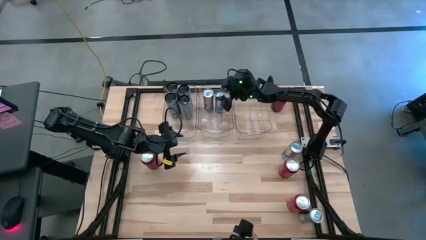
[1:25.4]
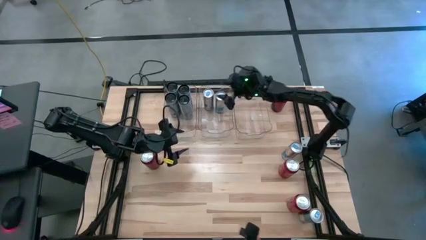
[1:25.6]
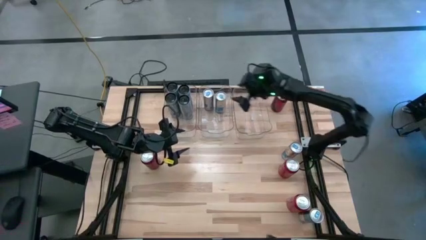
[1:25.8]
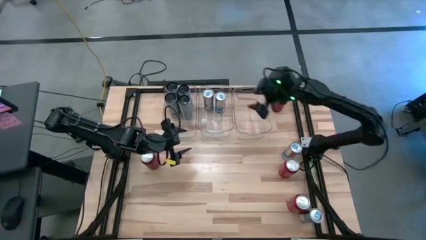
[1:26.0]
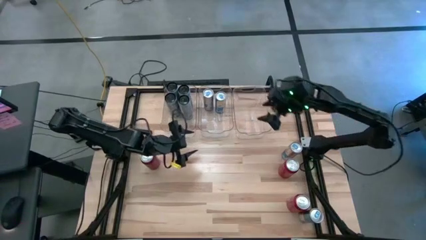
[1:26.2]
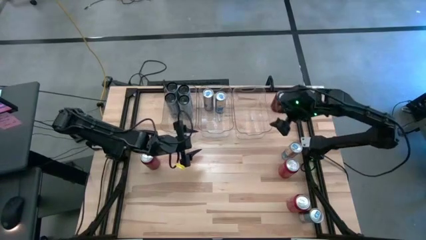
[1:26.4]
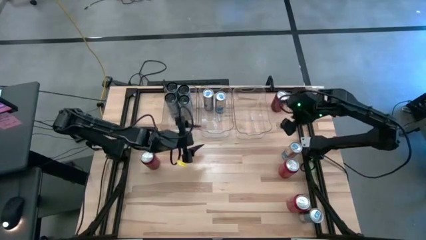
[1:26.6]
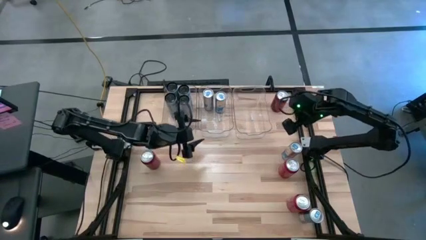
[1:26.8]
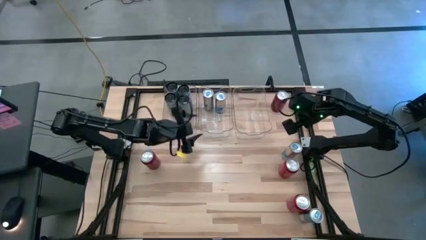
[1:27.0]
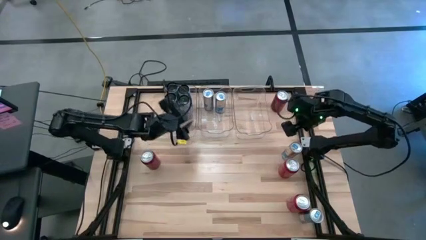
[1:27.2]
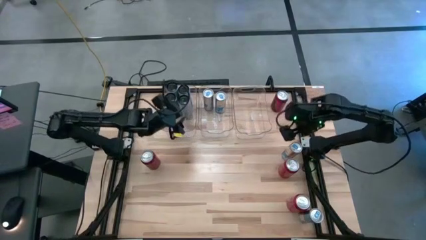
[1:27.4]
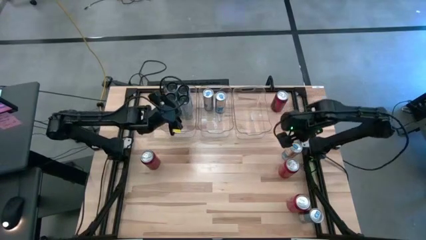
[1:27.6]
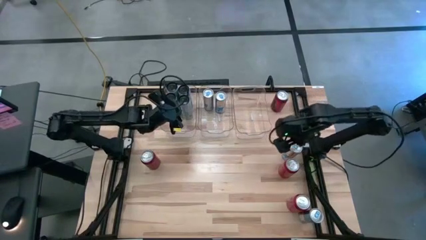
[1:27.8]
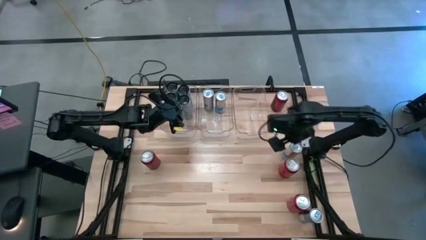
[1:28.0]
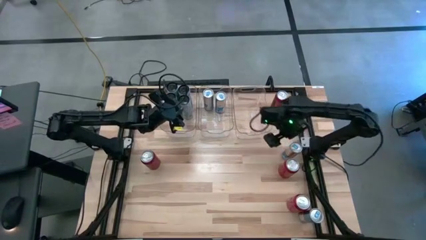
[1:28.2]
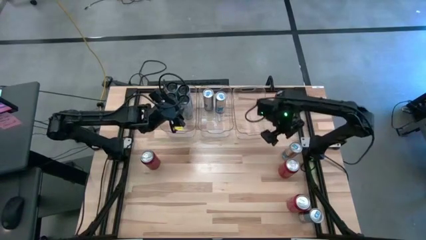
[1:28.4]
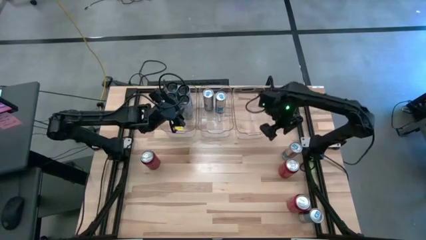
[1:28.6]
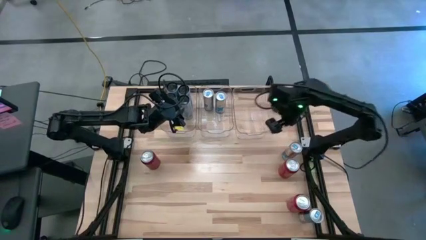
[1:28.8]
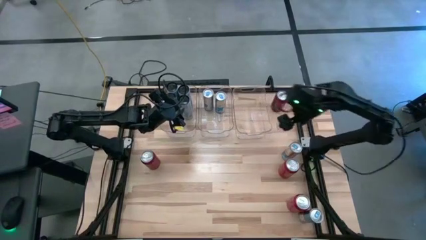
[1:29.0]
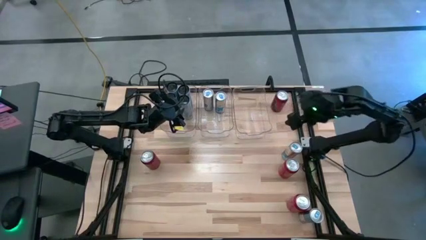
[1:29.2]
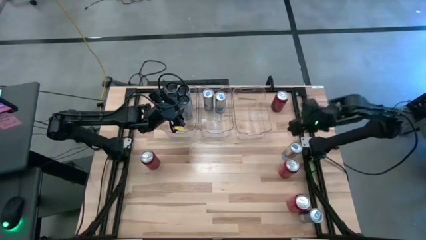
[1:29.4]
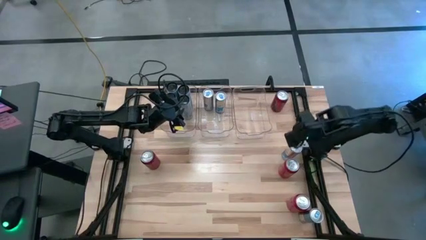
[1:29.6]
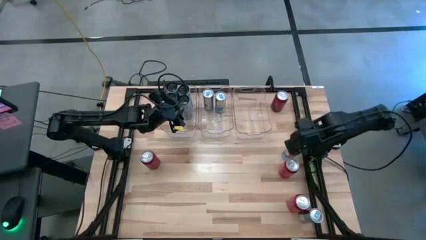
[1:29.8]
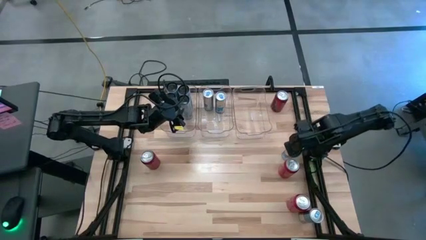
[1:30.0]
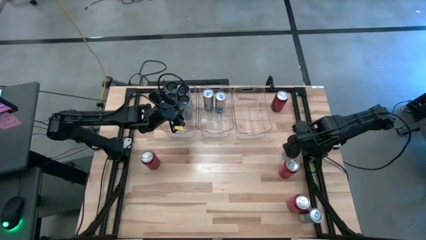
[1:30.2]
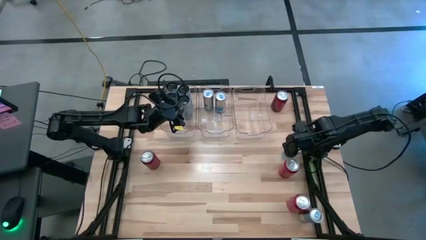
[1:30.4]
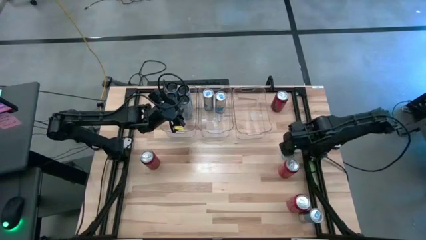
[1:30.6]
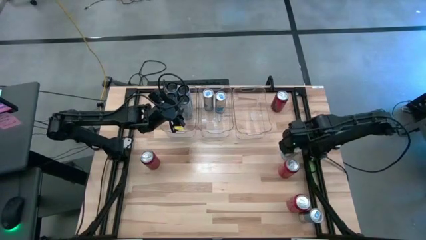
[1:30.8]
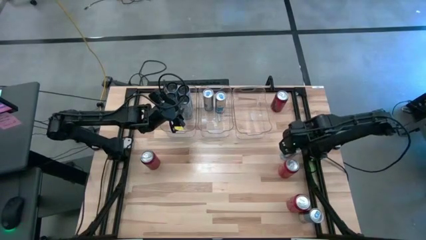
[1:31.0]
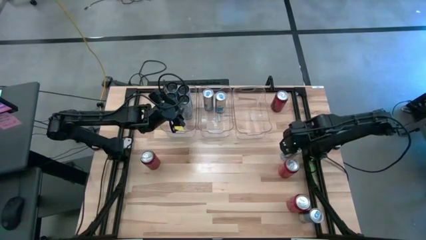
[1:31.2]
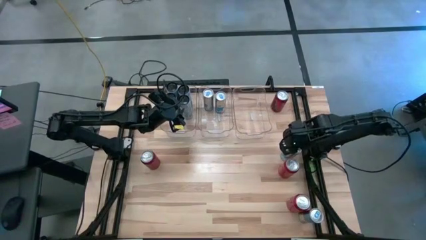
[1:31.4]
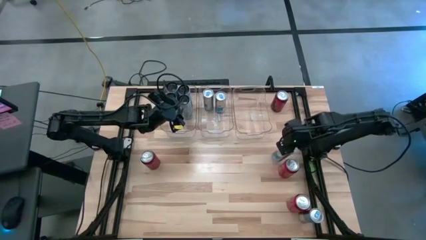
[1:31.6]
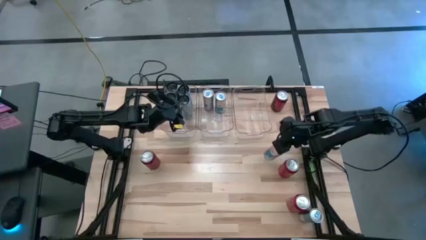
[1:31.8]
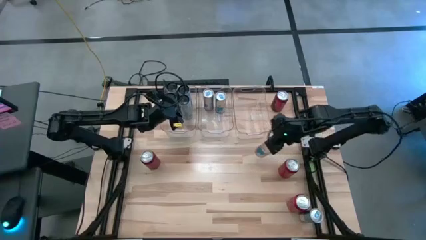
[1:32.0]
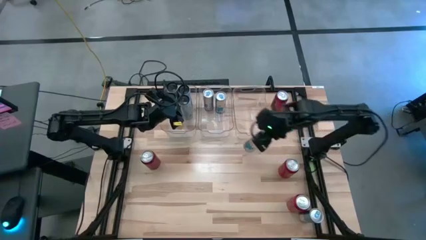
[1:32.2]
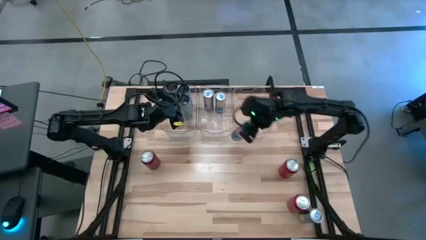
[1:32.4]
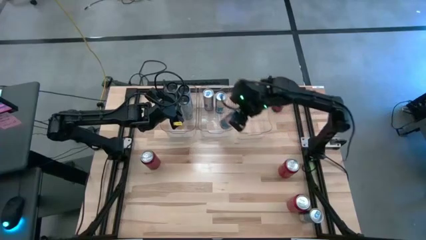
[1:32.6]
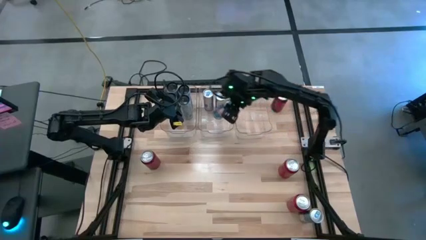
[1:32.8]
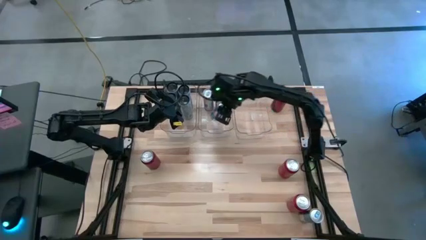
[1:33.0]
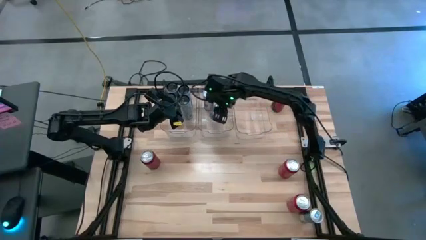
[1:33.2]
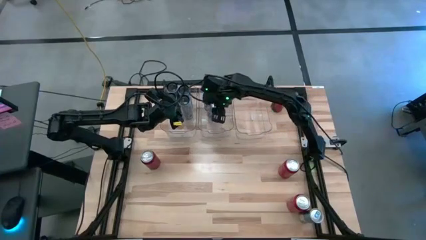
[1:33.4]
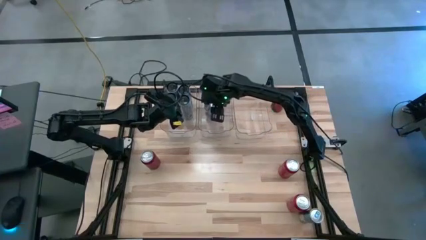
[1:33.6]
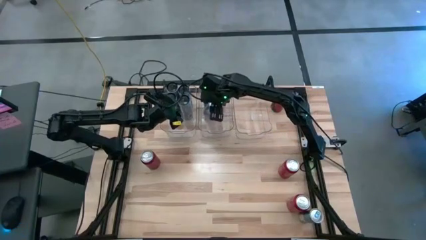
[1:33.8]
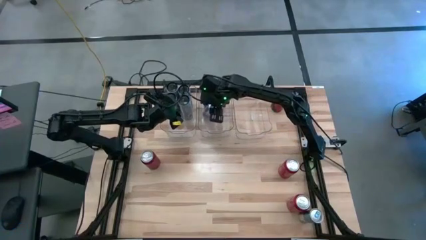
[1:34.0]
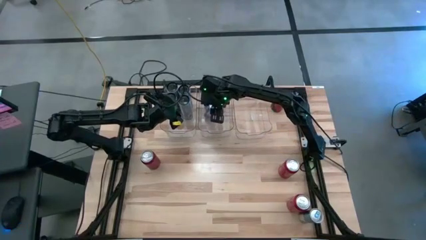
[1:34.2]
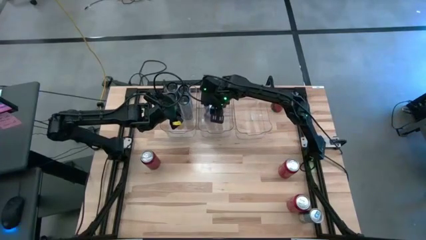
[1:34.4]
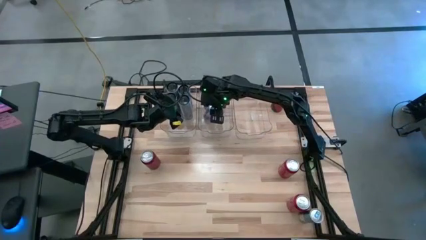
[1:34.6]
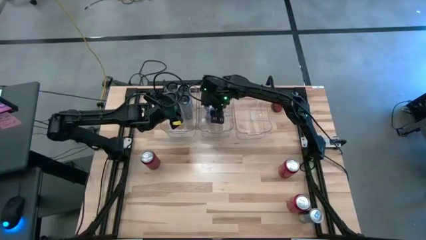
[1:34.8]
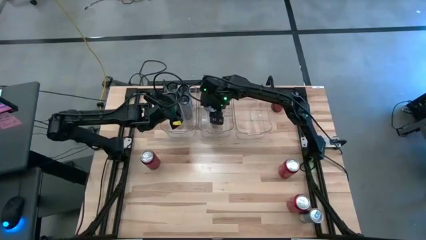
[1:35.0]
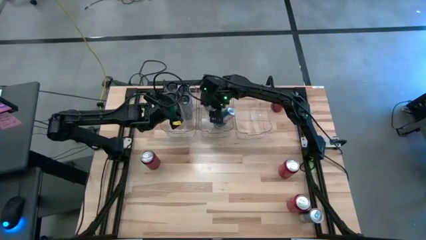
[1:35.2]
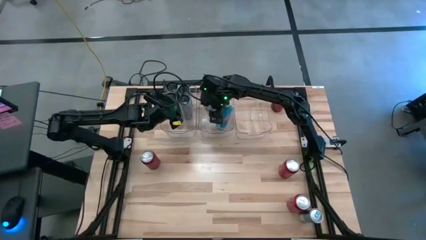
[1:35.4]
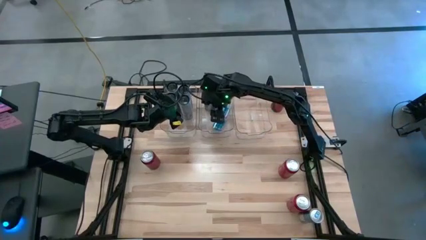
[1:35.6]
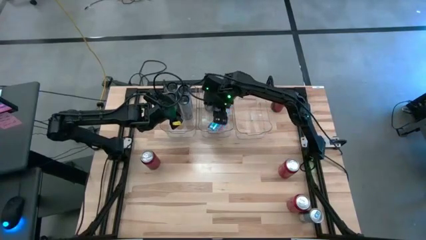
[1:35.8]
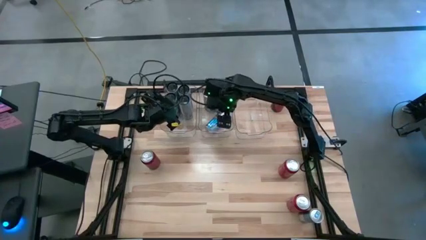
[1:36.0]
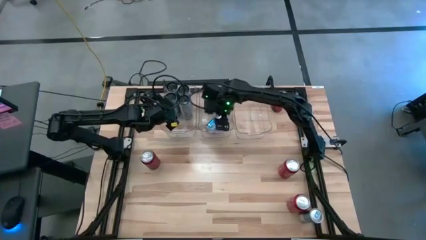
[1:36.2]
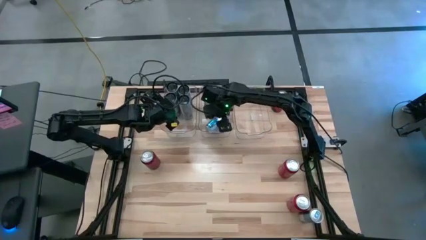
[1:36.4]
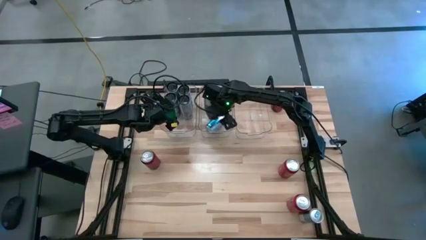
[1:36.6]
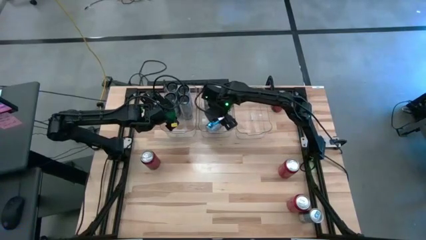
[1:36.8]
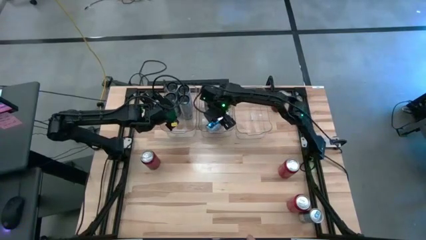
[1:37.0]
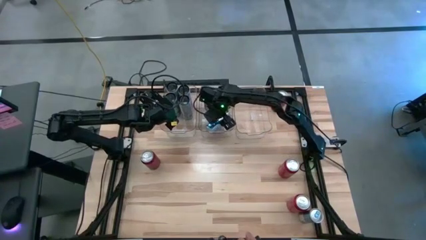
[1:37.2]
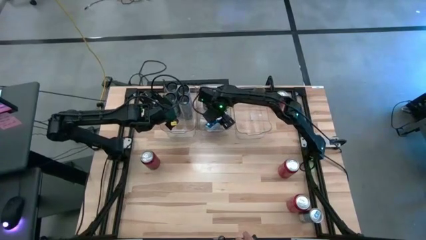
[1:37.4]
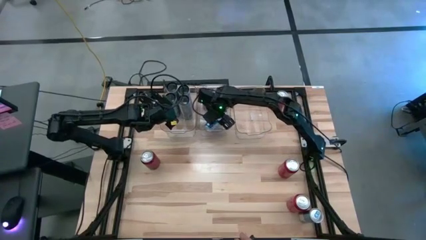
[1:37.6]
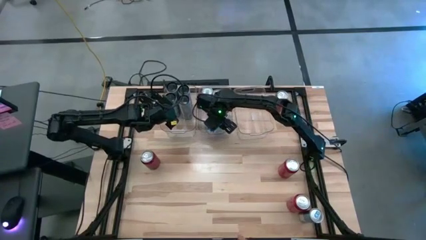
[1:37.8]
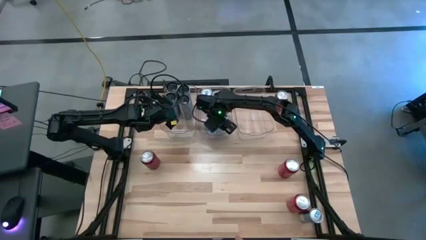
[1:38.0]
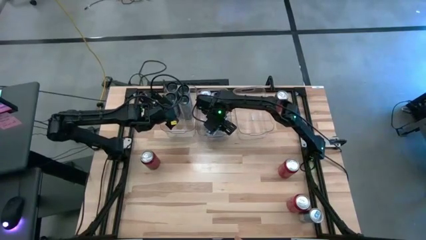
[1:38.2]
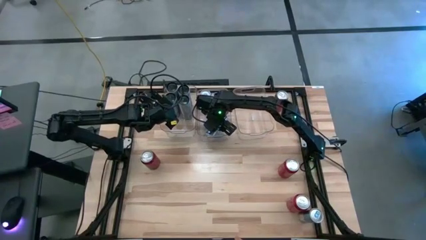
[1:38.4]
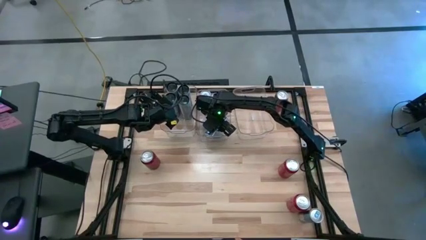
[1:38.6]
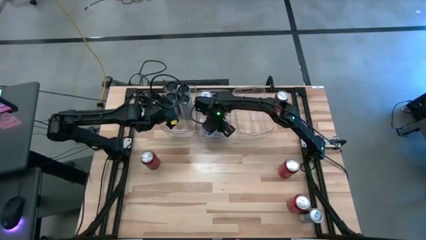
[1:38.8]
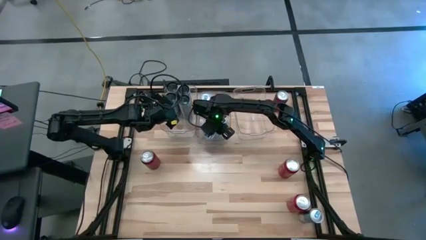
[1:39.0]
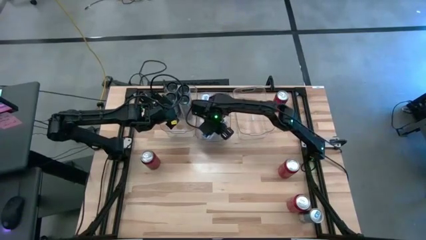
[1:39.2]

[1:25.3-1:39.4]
Task: Sort soda cans
Put the blue soda can into the middle transparent bin

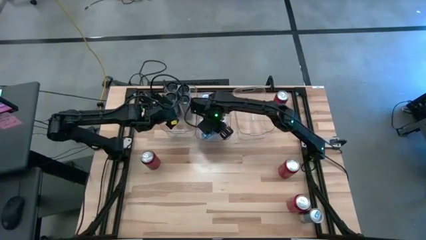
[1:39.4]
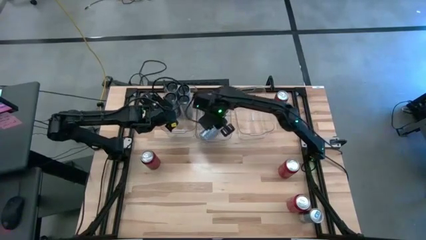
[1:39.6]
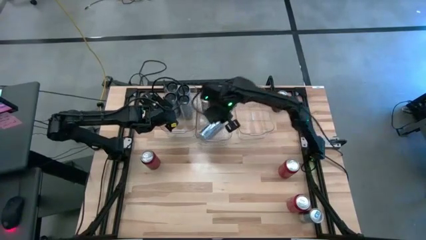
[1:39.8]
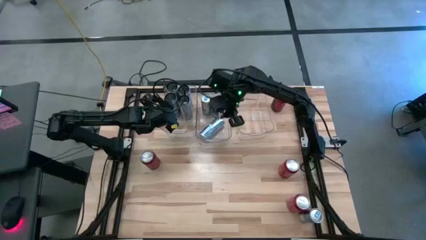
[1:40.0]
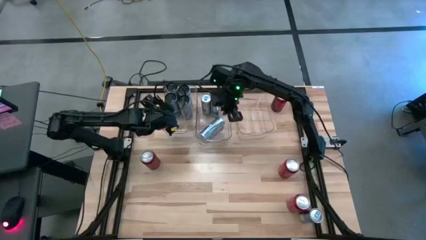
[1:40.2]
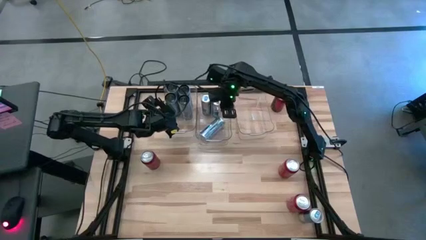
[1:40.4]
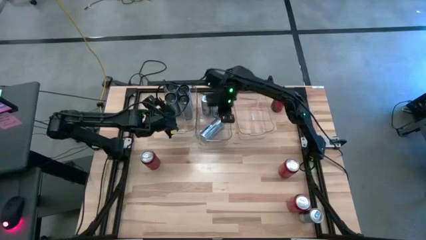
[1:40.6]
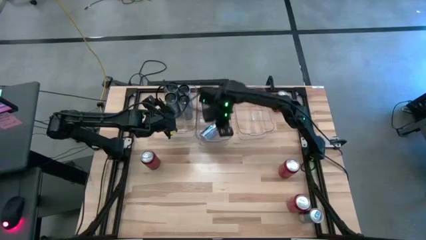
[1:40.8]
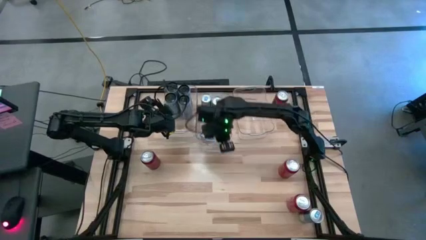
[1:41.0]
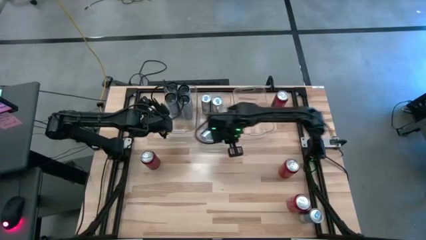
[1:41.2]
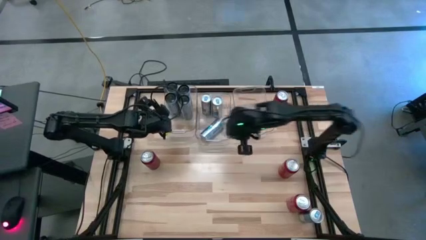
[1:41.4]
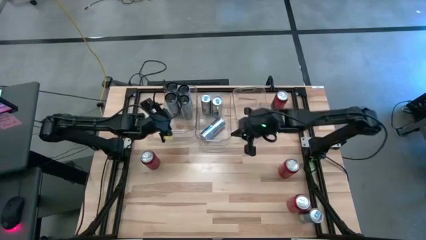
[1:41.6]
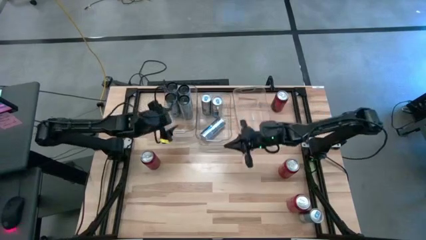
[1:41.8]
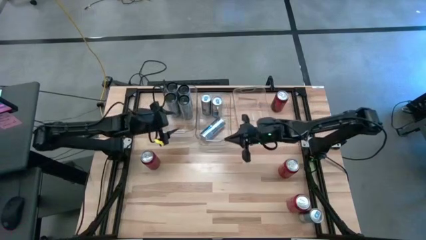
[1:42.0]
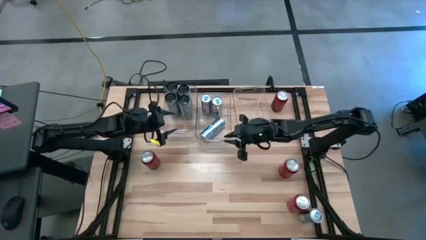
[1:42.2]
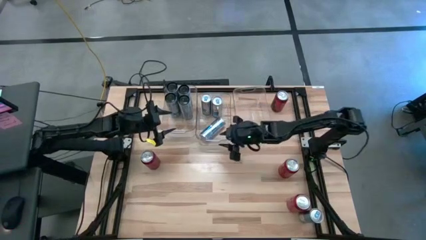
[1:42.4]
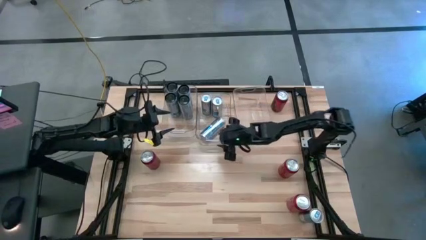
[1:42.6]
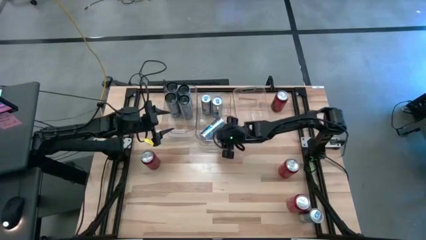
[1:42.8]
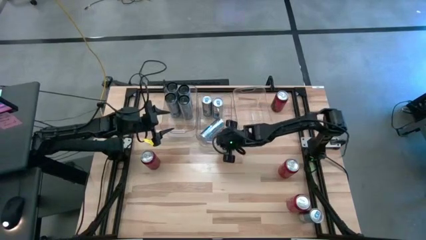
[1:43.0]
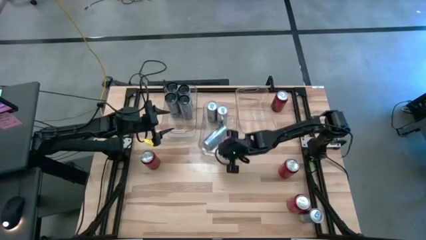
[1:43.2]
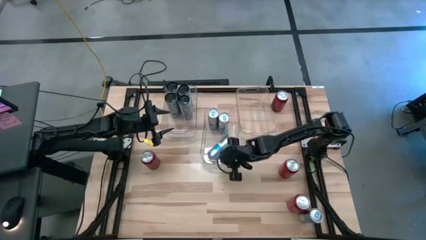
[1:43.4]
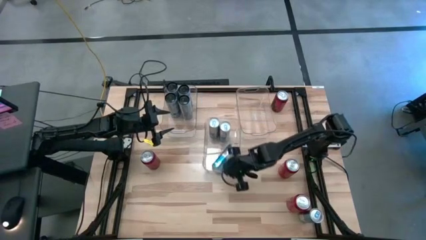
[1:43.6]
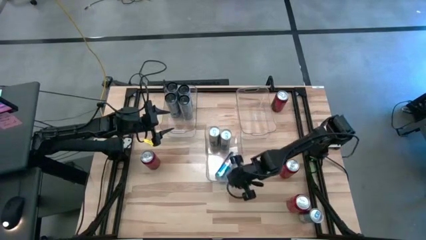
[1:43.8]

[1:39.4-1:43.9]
Move the middle transparent bin to the center of the table
